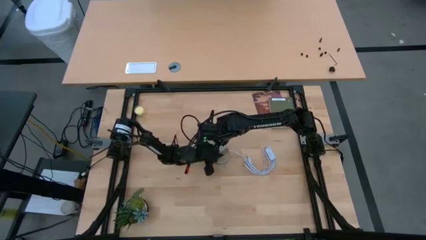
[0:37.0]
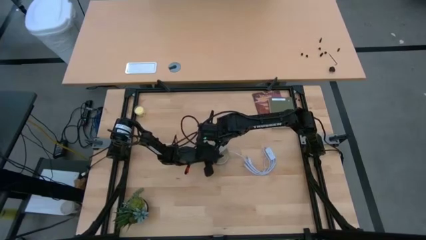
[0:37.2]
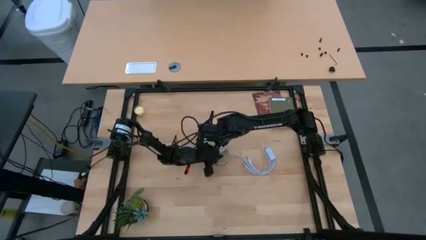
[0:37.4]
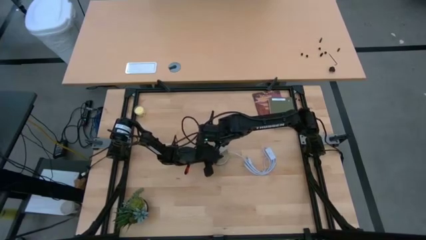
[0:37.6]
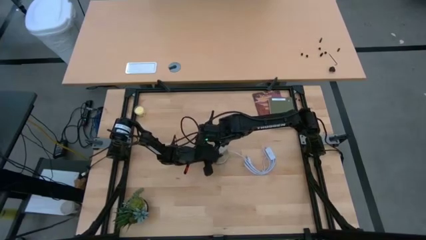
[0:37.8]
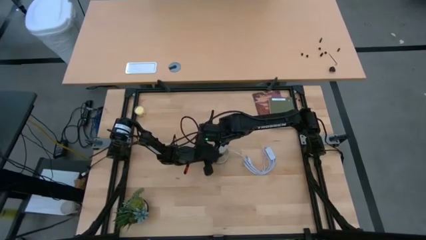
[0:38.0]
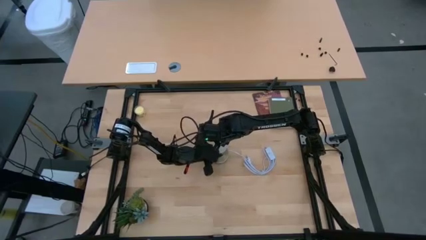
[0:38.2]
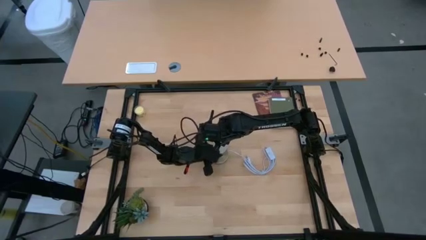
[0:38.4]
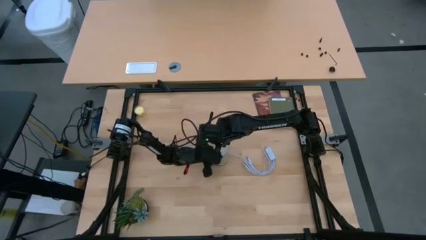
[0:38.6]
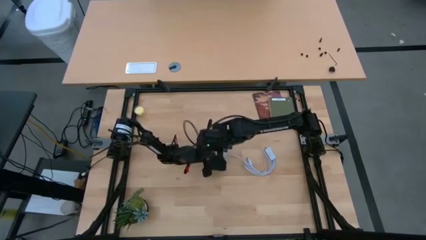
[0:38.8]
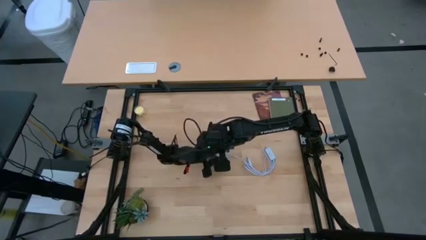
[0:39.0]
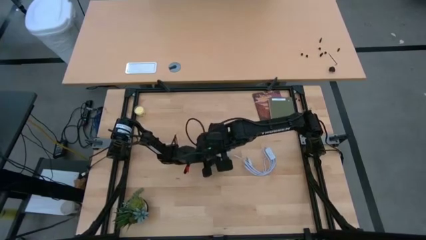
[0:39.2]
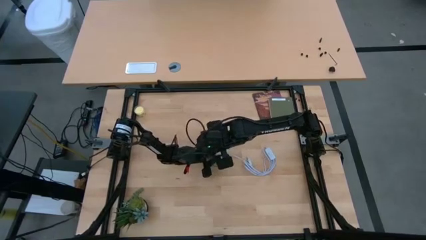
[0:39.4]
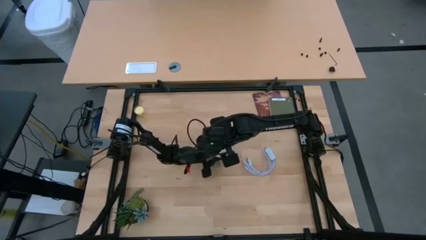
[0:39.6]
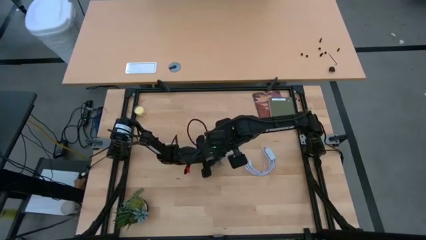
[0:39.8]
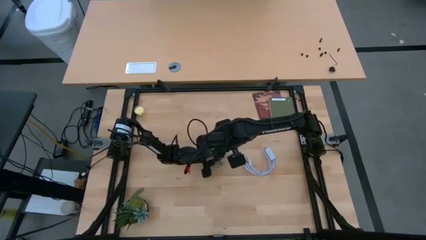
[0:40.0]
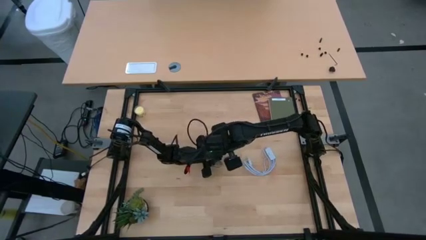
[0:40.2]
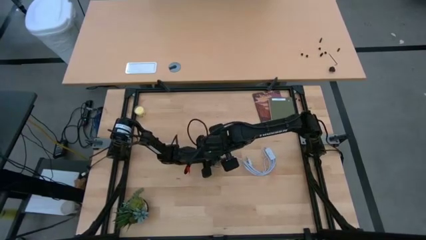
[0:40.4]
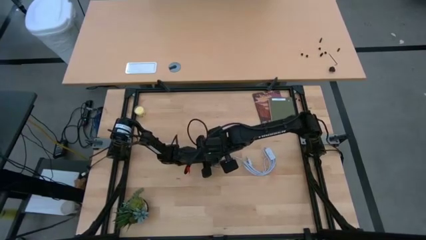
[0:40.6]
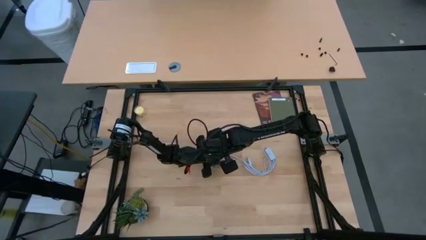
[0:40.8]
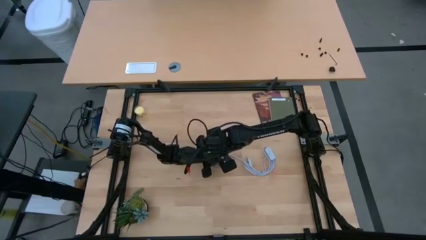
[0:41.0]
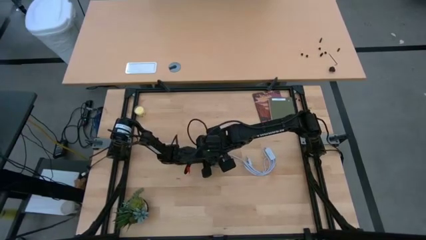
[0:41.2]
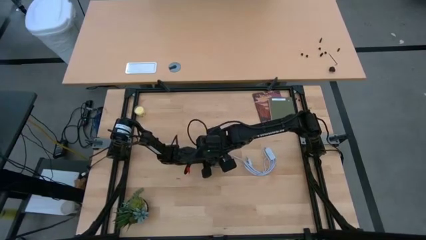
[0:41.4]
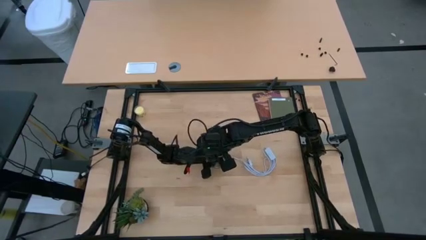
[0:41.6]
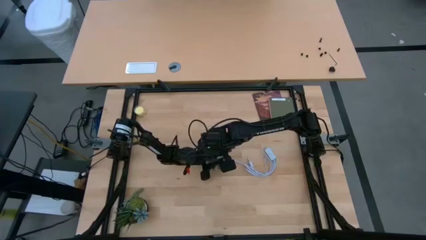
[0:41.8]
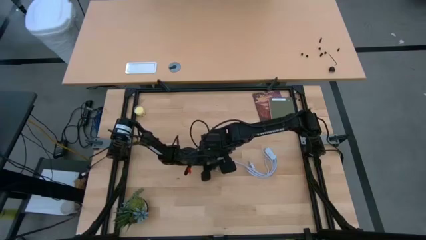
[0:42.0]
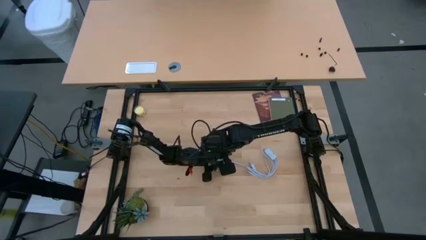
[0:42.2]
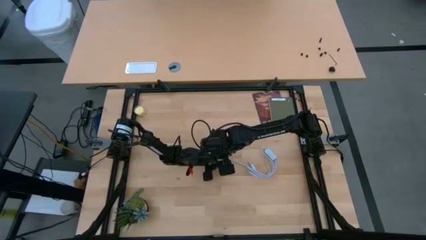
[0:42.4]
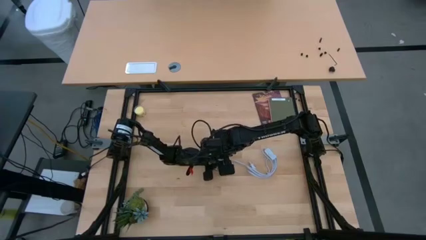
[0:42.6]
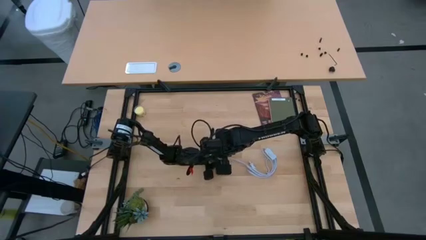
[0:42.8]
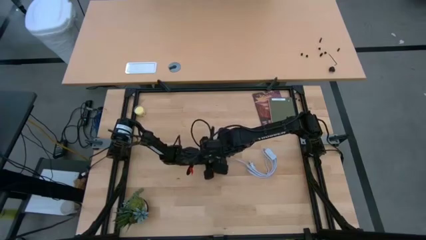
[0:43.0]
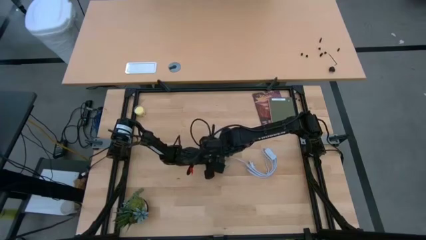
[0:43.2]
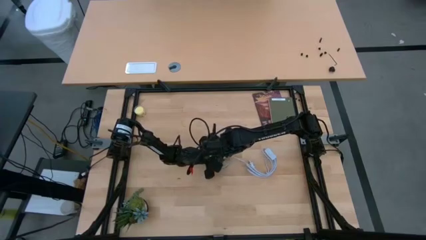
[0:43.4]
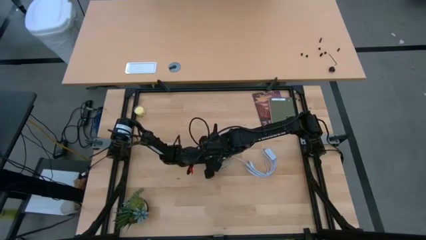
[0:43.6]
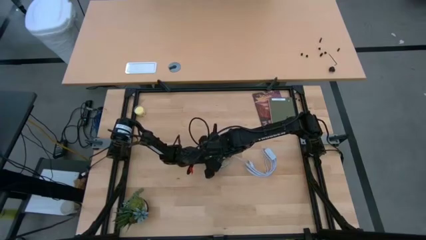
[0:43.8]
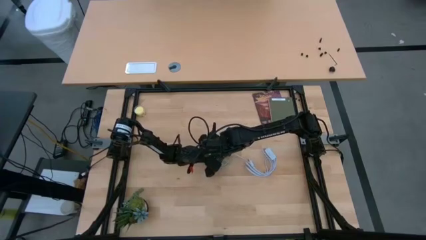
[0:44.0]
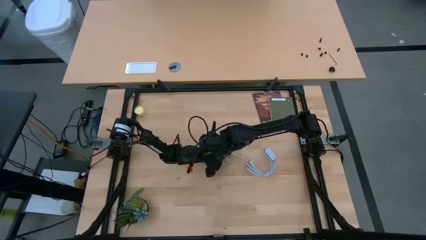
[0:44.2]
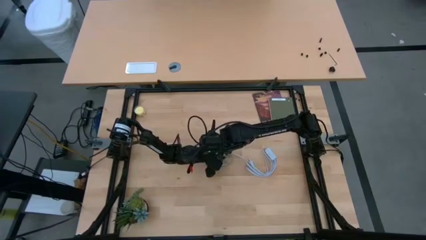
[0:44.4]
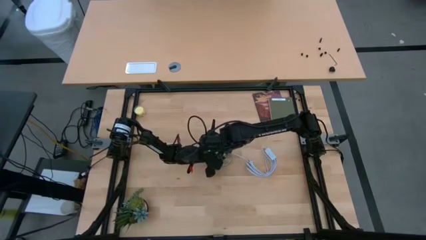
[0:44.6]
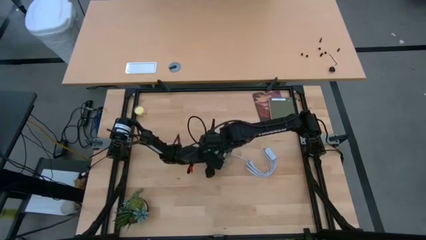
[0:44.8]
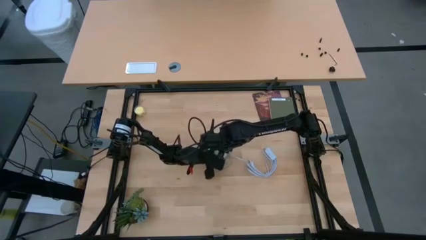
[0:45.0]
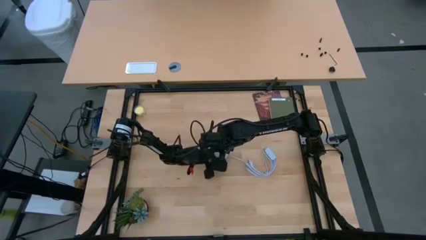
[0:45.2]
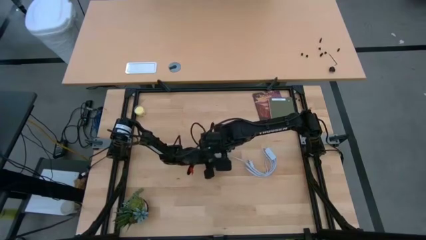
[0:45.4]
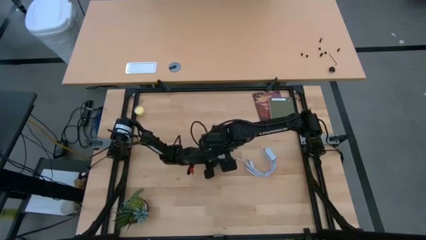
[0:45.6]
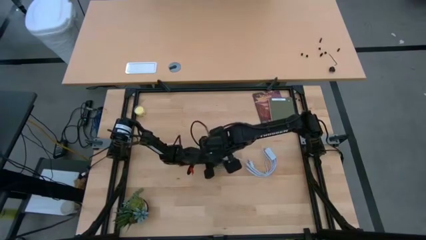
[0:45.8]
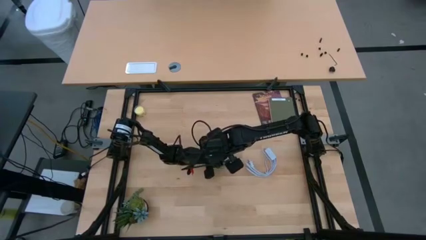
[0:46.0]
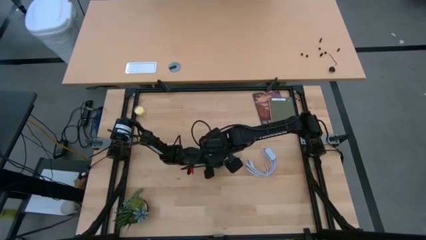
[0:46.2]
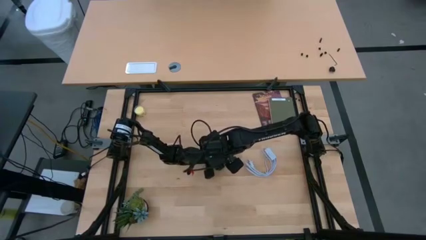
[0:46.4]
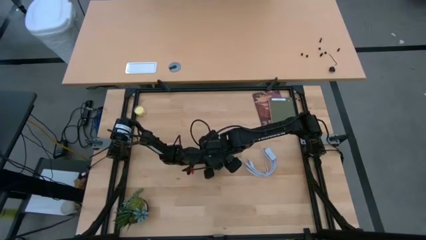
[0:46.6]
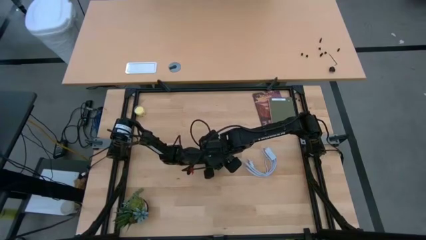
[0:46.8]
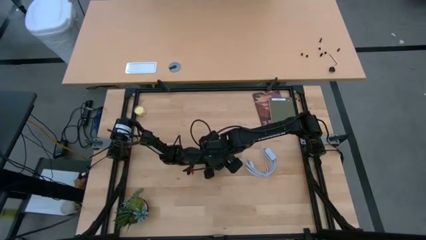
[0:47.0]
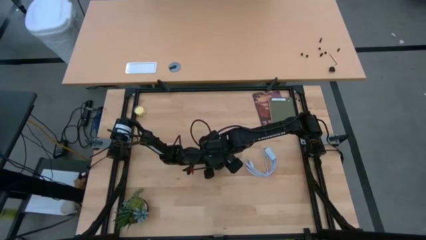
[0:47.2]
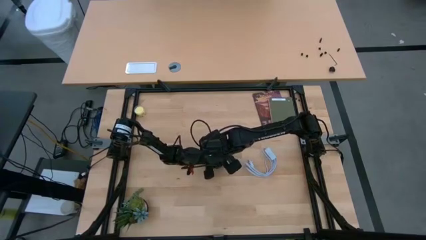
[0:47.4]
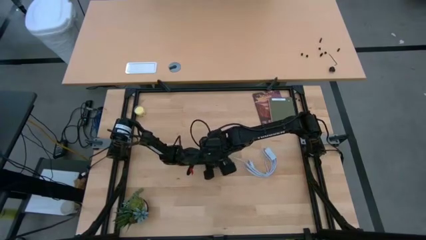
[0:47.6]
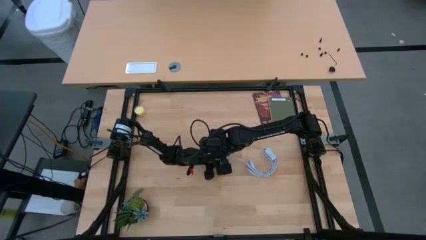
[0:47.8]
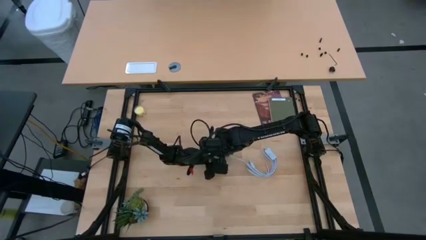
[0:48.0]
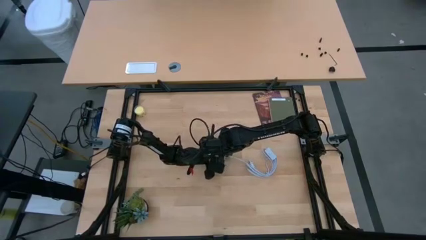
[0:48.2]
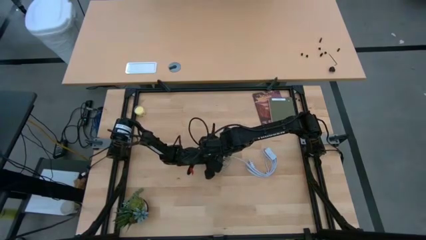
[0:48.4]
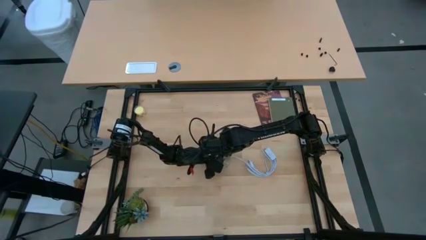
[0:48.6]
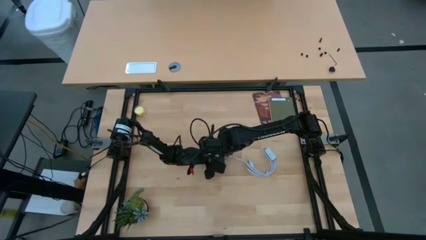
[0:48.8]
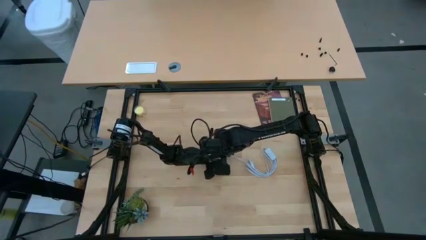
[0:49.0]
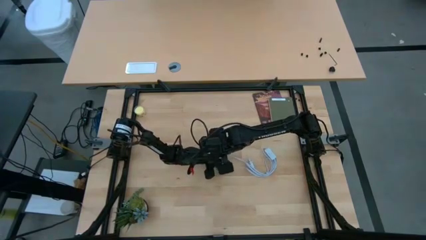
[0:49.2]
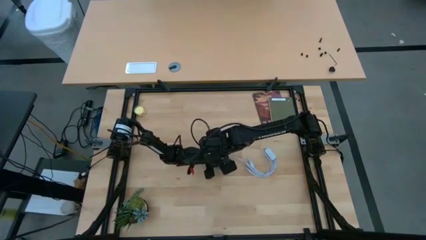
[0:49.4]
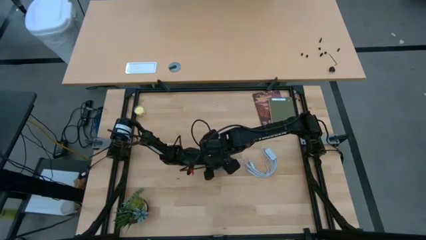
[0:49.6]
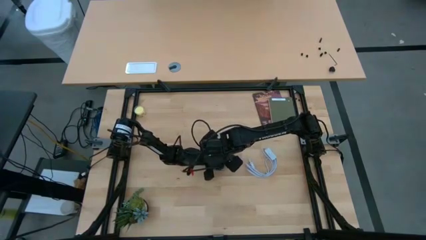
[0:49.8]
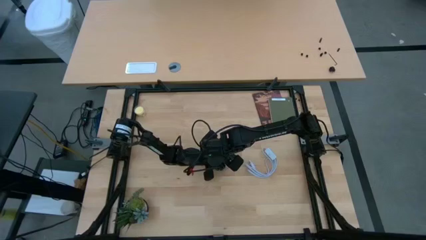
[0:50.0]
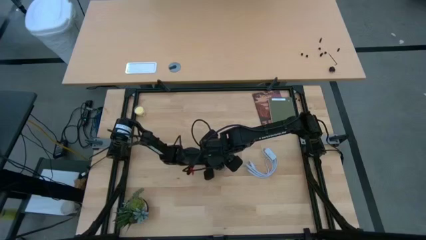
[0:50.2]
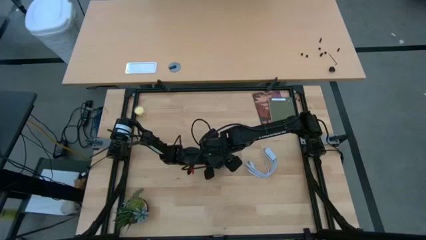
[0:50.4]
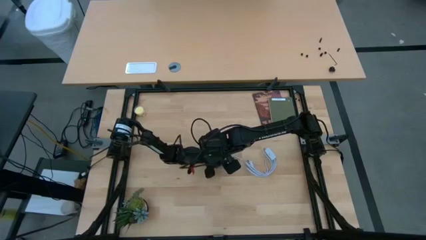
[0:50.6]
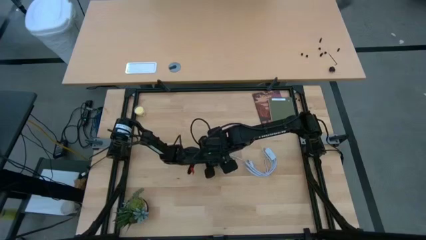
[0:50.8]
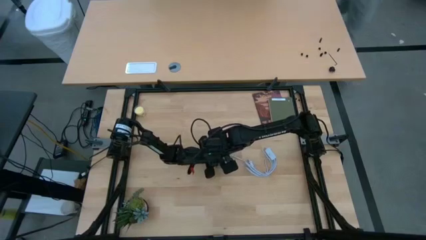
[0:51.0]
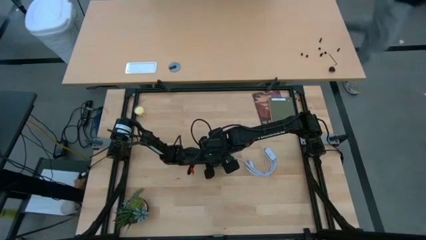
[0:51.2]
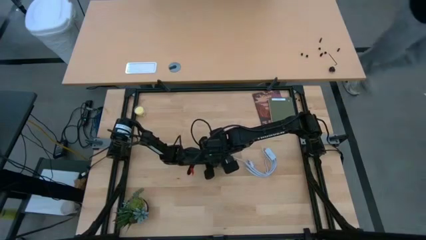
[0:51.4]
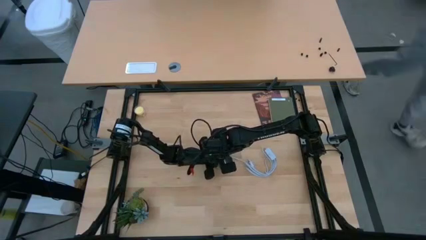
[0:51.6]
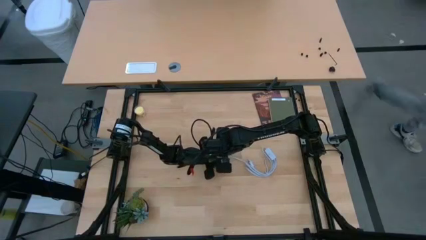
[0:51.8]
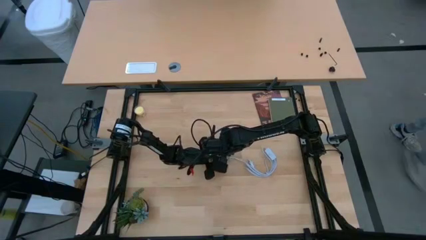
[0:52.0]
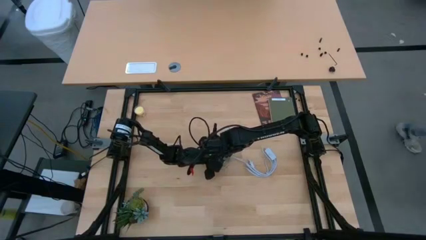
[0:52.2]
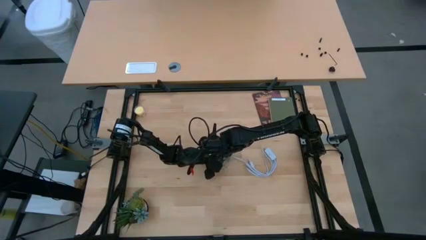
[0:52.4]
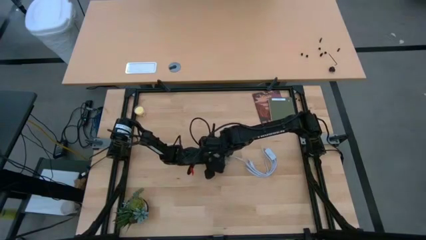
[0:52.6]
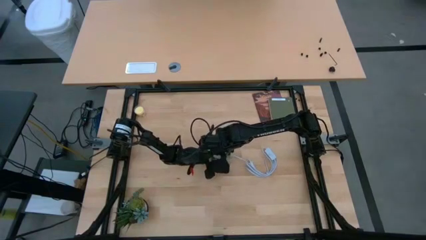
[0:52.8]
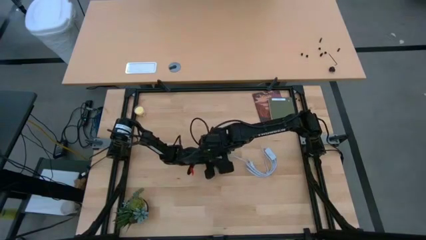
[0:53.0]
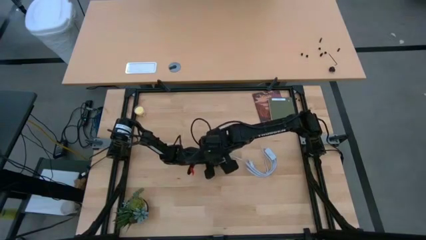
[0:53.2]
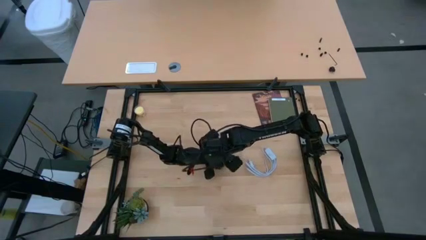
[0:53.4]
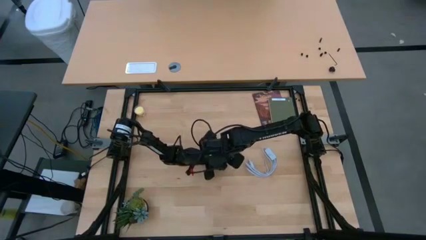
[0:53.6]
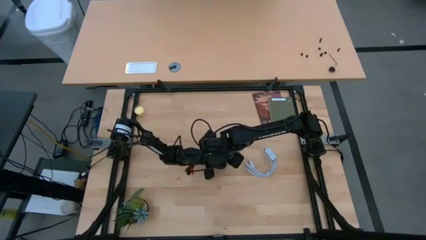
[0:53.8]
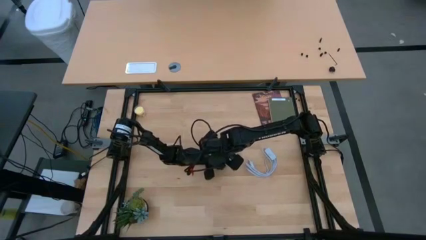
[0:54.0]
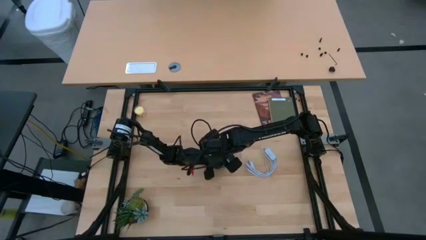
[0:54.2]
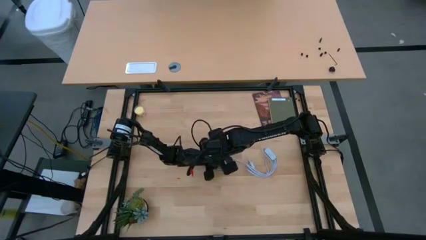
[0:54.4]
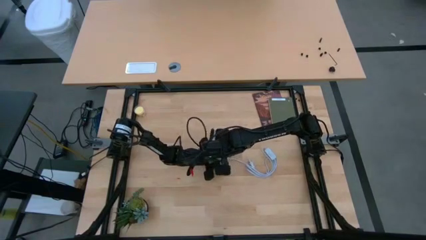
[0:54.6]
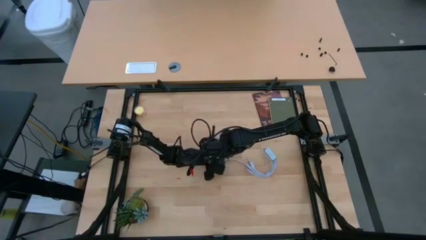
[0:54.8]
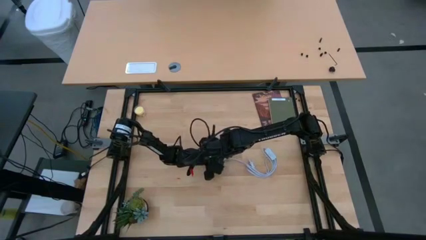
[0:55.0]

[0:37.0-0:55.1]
Task: Screw lightbulb
Insert the lightbulb into the lamp
